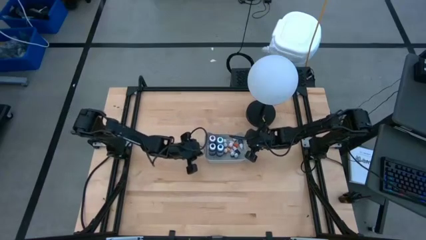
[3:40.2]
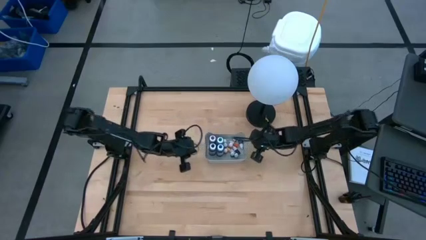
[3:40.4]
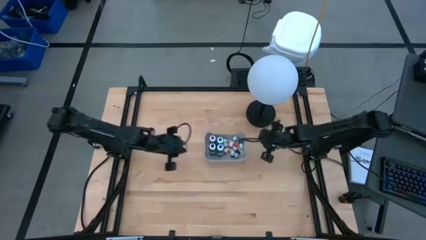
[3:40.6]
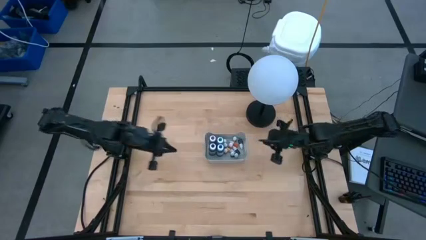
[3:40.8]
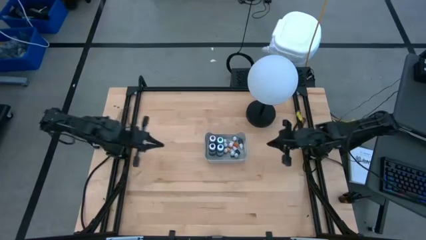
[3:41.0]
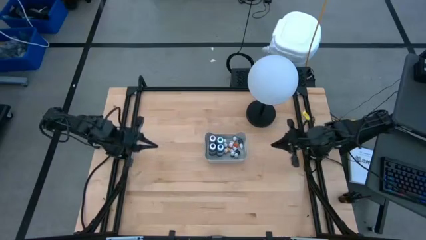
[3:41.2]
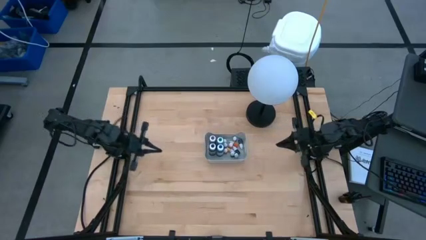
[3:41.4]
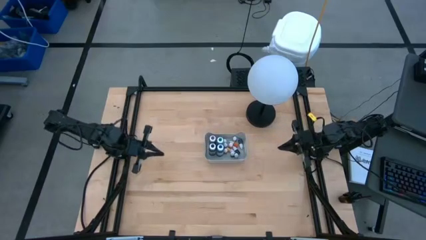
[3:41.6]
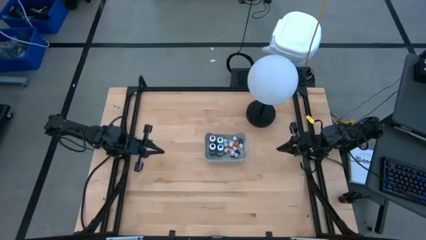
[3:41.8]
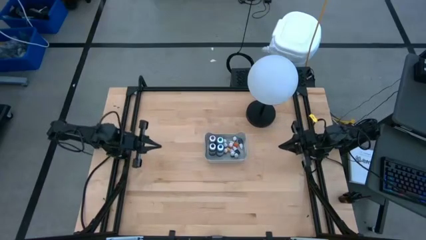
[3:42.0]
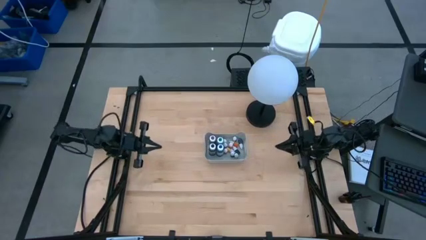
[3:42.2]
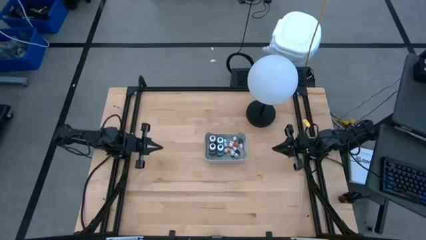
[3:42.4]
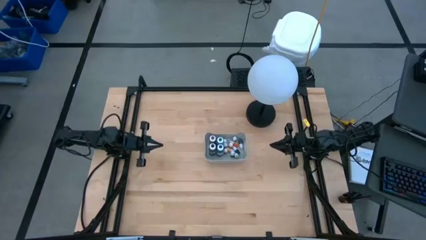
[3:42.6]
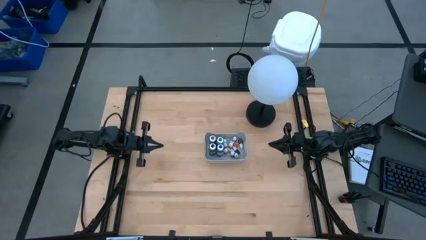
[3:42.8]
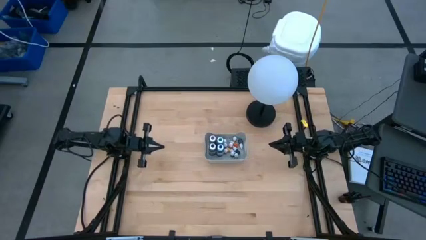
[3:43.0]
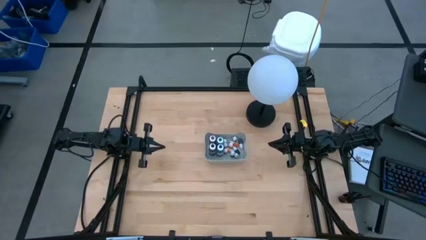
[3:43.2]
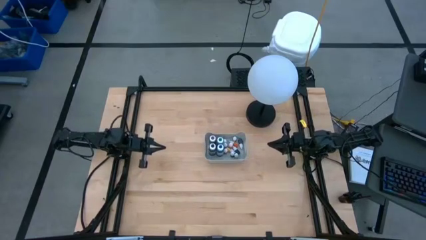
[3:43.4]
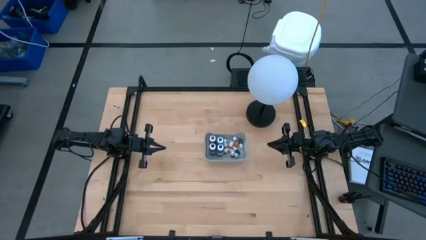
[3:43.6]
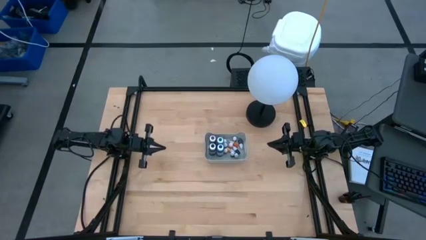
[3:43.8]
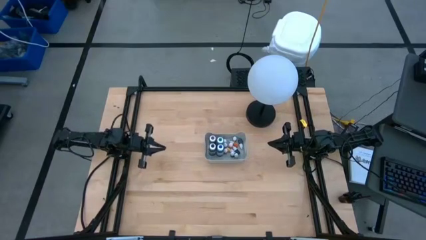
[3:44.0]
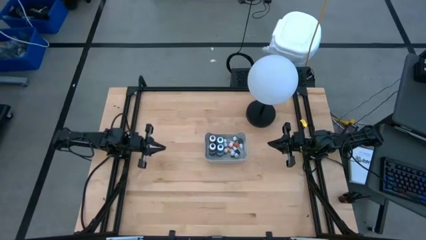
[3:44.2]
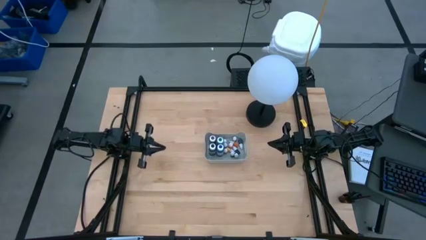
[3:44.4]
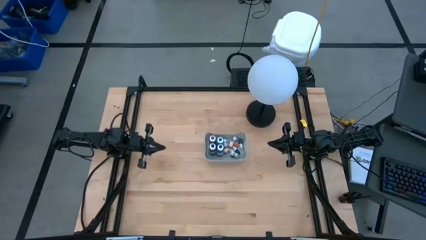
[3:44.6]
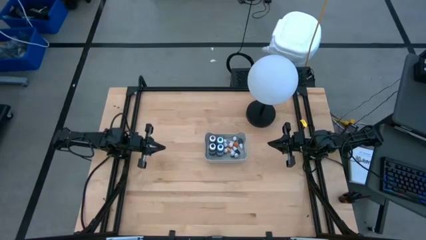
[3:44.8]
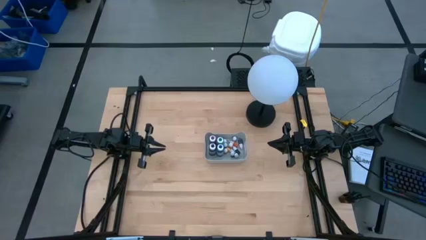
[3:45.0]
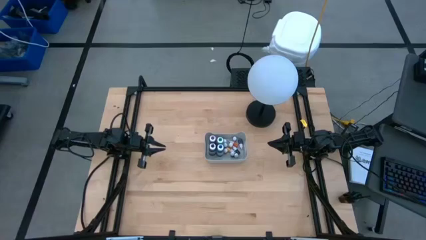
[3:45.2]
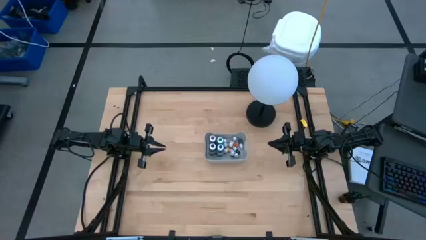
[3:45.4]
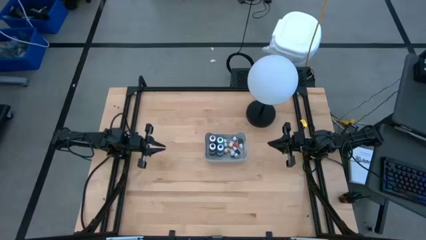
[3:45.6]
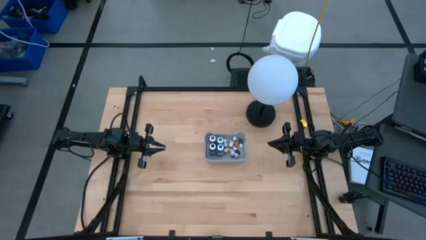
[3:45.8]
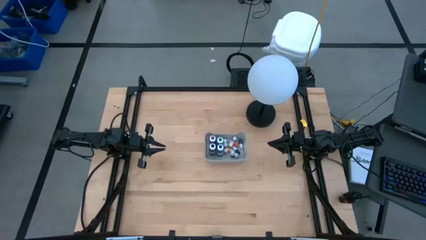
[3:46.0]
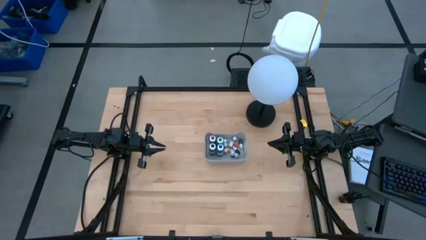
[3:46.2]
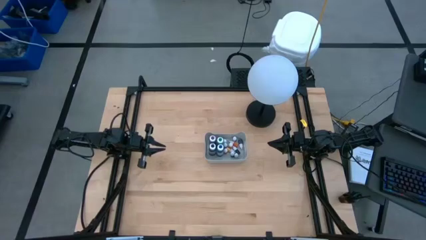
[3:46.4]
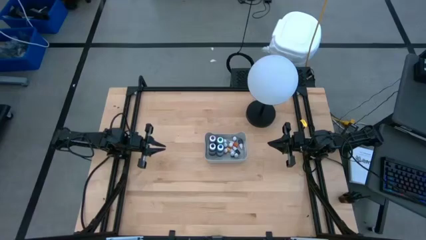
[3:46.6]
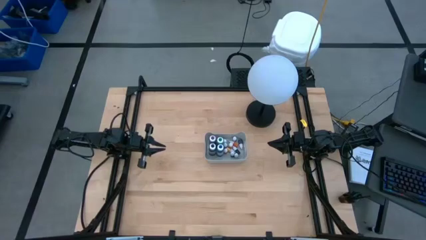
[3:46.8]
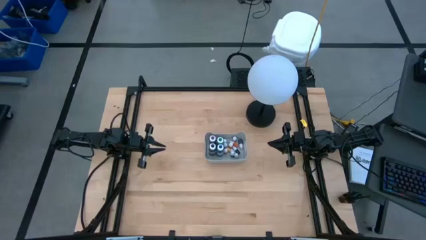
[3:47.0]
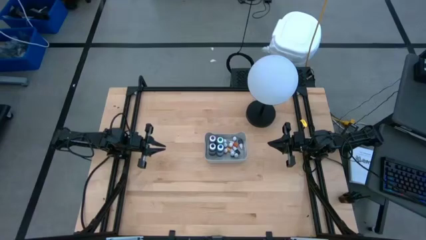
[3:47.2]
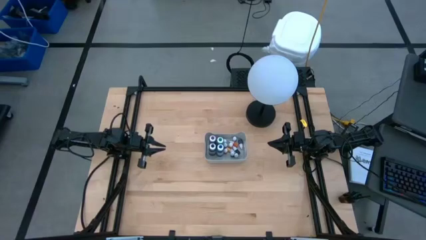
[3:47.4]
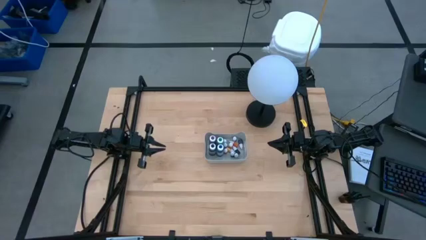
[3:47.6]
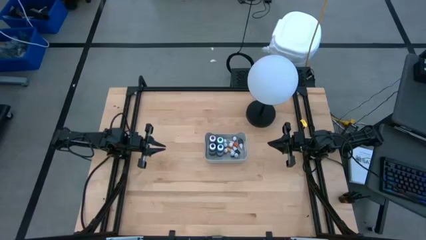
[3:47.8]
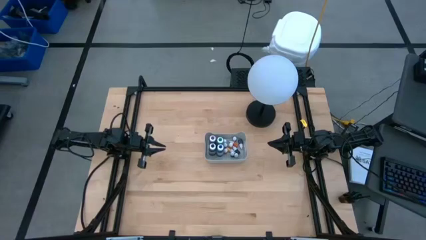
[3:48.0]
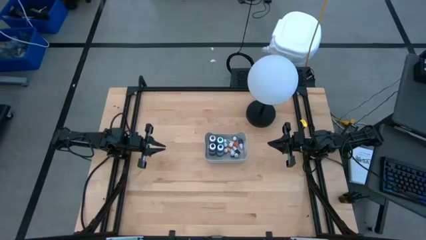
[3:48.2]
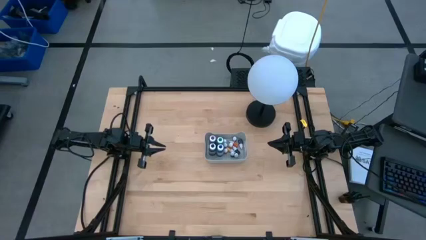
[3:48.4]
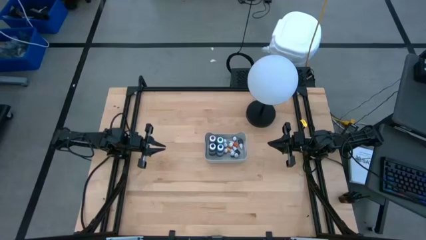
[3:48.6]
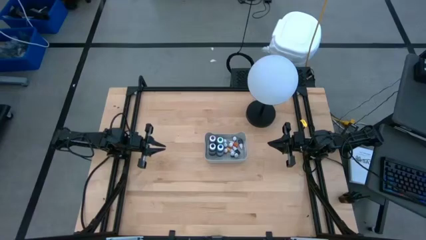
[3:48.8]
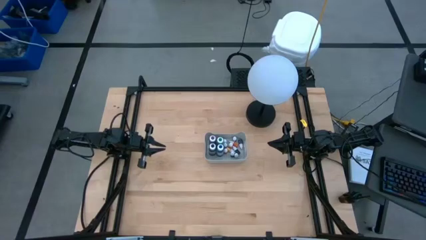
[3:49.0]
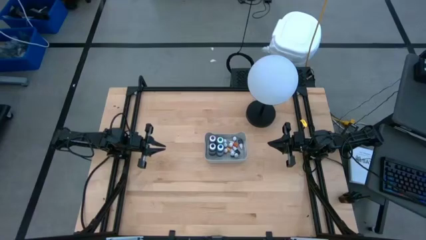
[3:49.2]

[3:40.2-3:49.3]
Task: Pick & Place food coloring
Return to Home Position

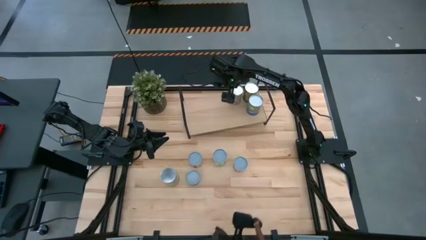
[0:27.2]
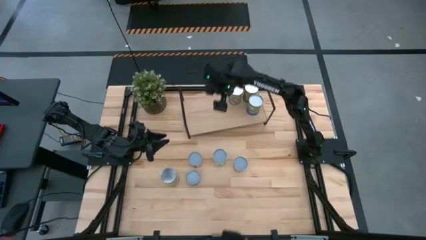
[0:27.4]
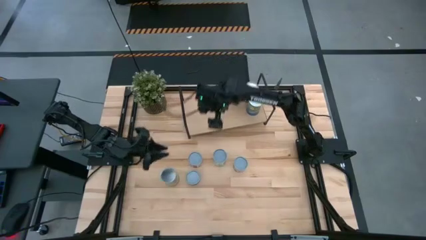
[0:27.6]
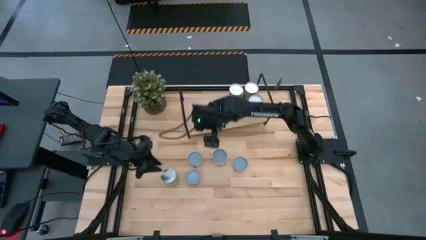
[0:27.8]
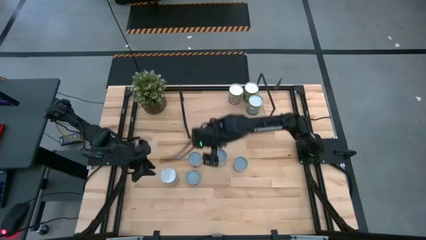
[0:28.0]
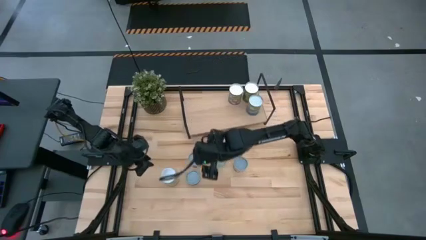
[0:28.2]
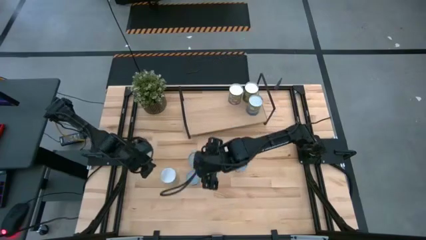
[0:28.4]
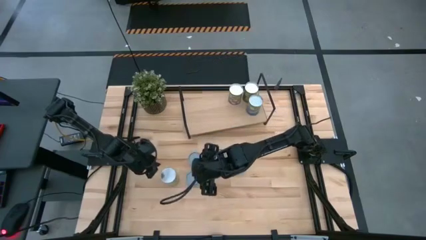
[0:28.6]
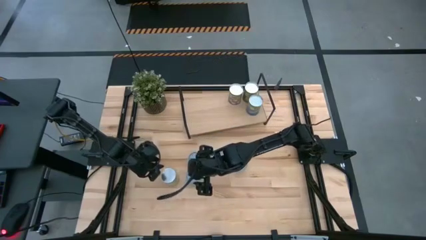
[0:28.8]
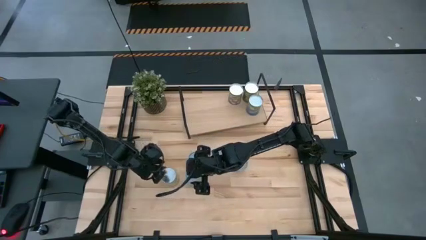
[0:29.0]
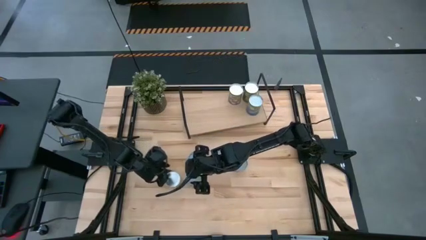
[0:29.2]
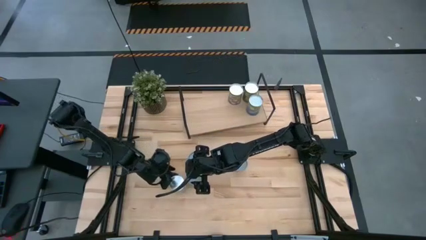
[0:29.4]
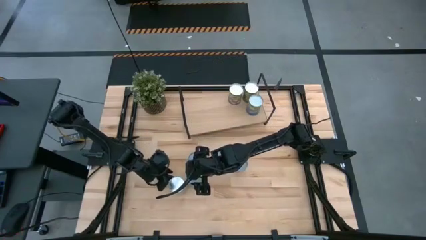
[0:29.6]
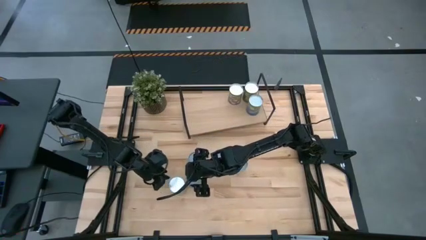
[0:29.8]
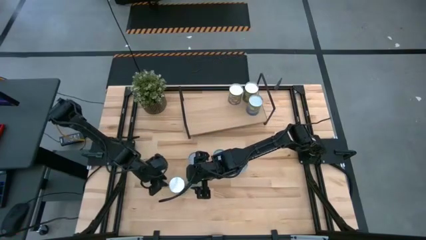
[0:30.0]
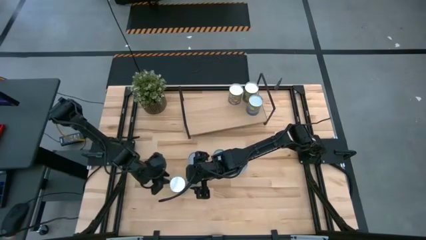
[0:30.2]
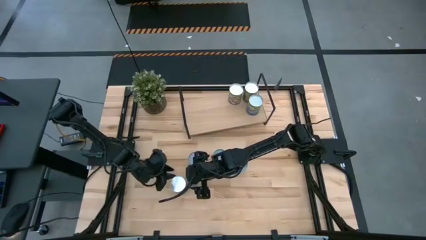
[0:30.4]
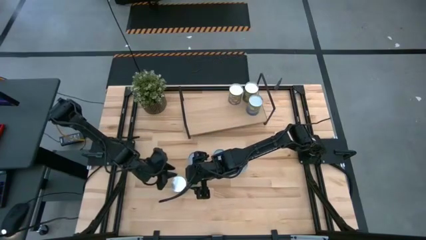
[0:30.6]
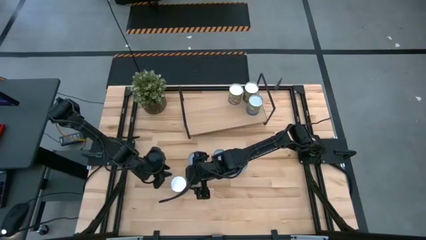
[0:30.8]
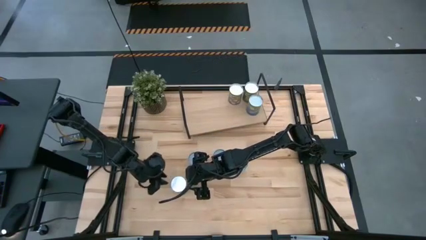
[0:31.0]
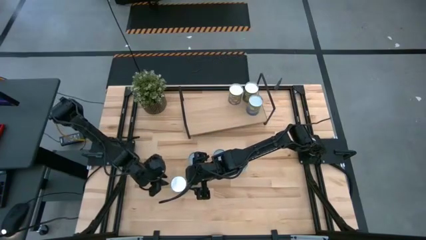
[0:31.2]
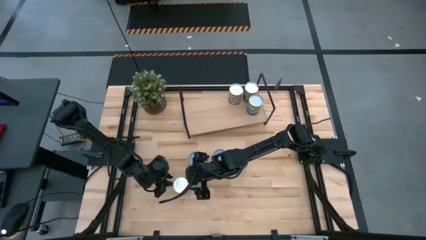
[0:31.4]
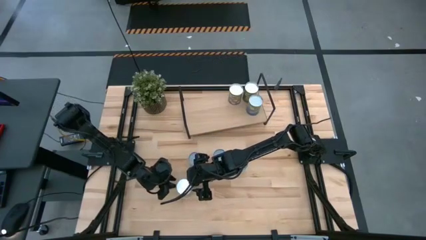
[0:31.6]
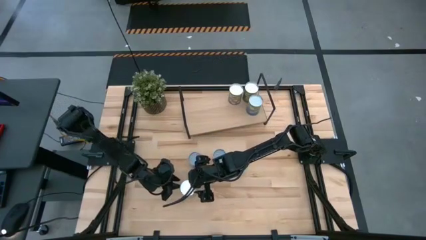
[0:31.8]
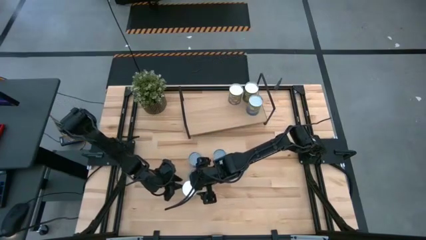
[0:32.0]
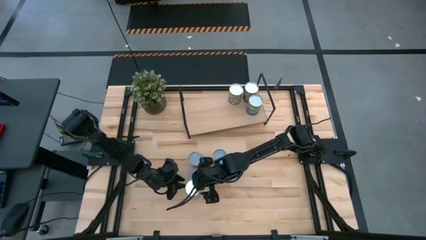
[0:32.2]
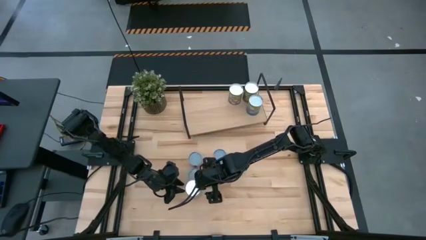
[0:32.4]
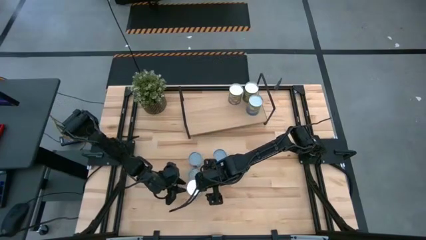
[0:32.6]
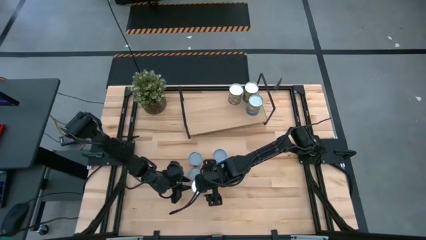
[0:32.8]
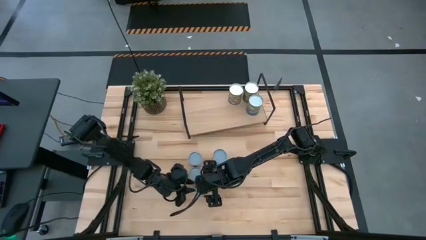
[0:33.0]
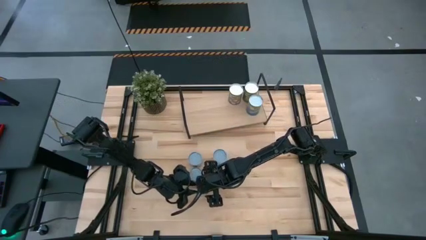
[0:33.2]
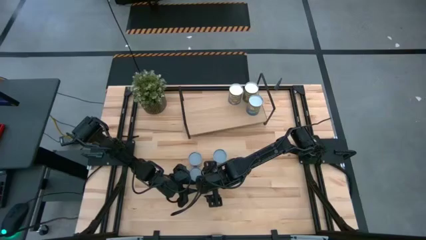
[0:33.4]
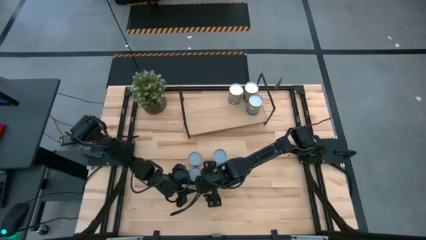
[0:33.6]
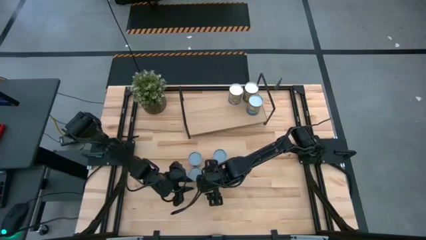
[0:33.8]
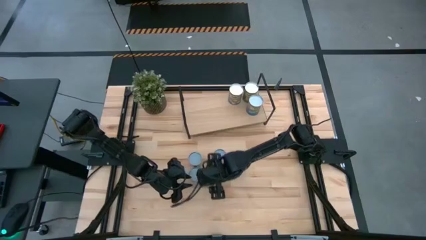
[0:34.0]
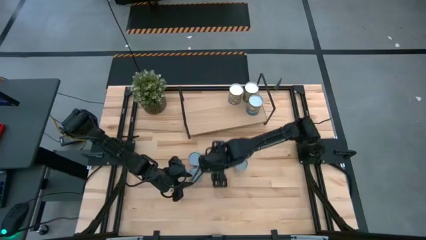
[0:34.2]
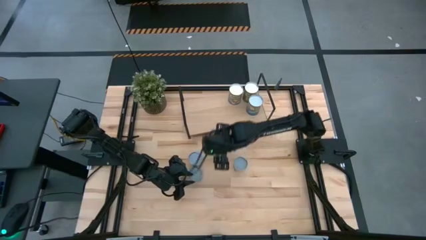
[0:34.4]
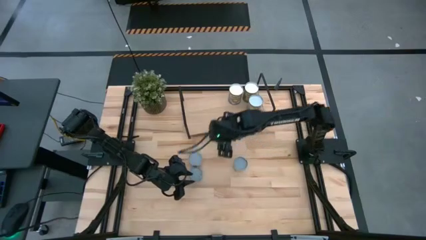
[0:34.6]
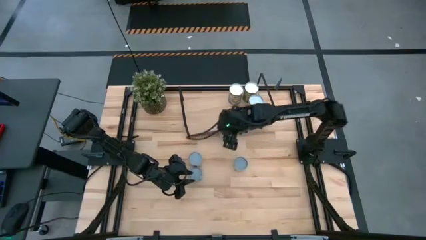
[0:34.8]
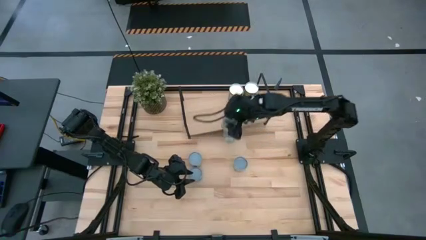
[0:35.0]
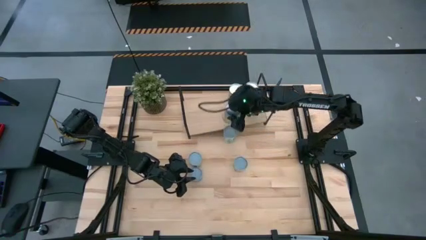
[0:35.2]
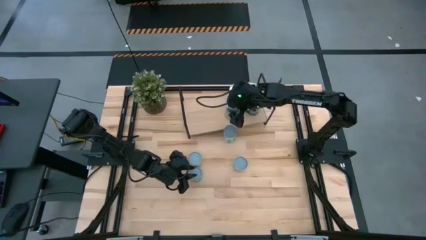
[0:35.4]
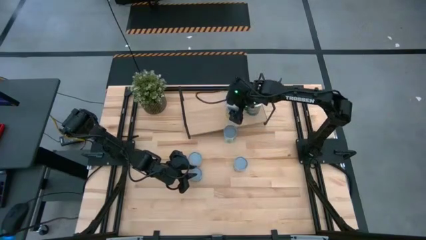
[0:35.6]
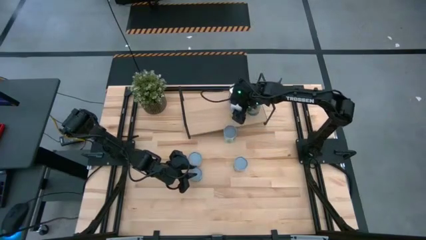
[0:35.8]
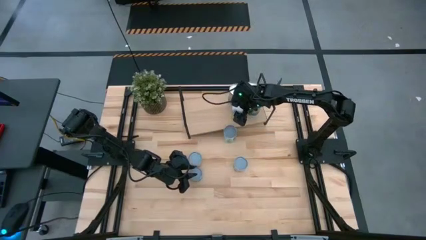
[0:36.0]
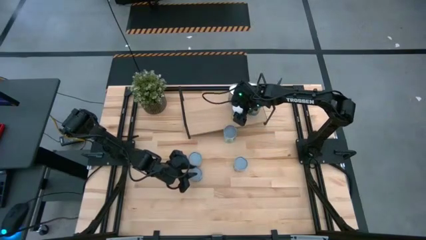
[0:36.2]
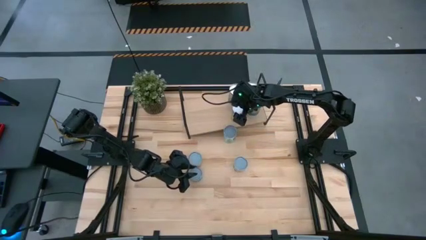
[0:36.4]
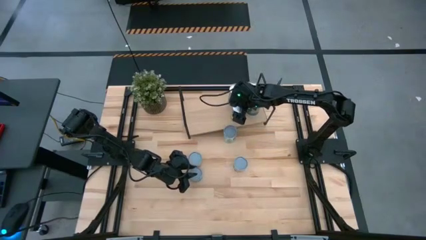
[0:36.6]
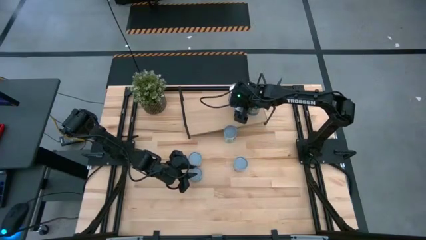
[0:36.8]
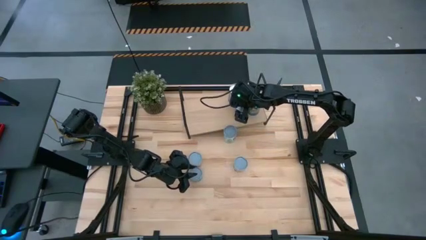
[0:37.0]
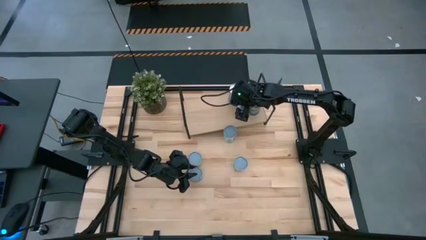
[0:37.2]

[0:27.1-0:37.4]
Task: Pick and place cans onto a shelf
Put the canned carrots can on the shelf
